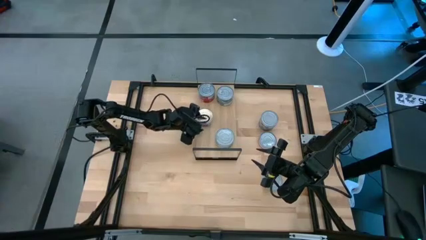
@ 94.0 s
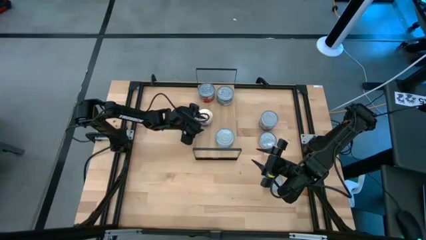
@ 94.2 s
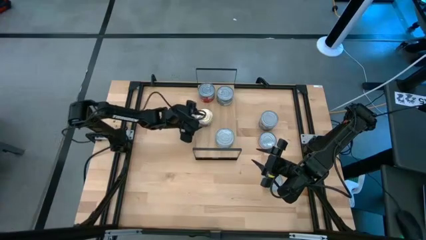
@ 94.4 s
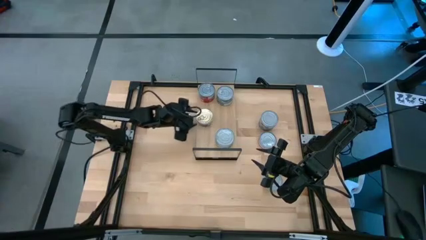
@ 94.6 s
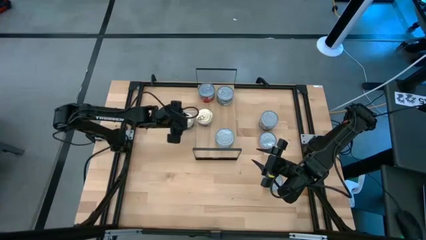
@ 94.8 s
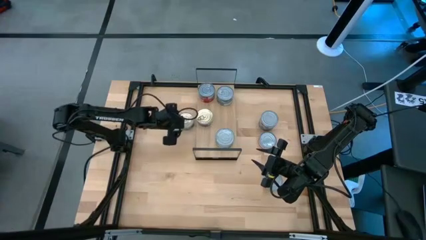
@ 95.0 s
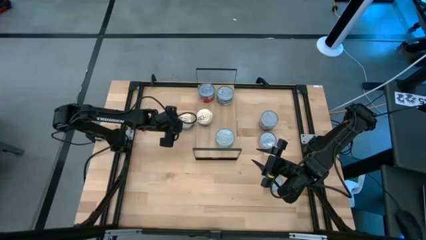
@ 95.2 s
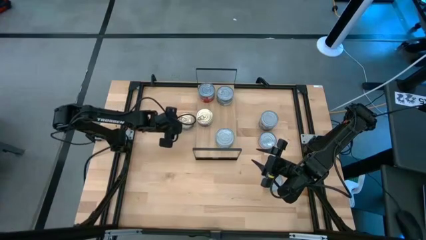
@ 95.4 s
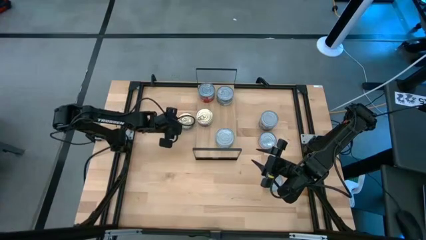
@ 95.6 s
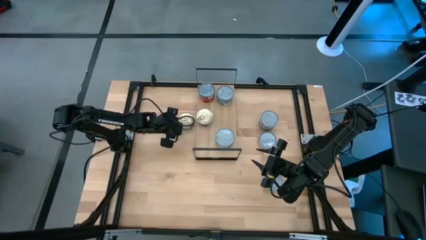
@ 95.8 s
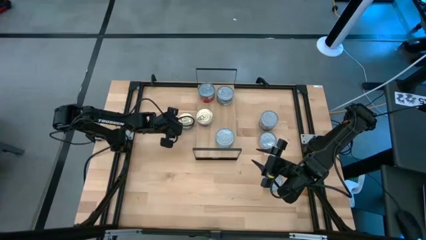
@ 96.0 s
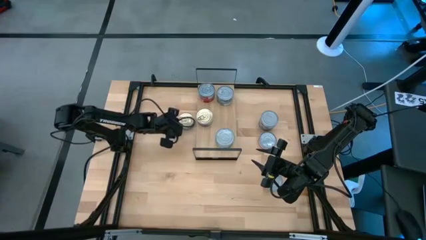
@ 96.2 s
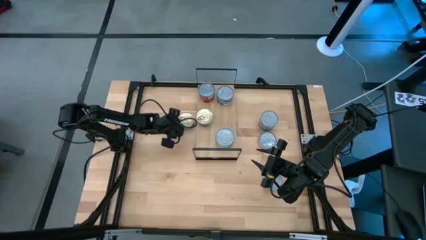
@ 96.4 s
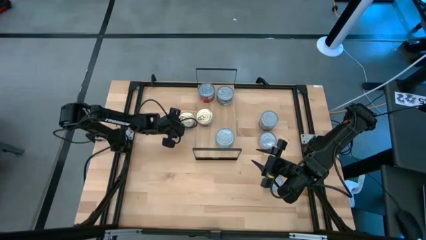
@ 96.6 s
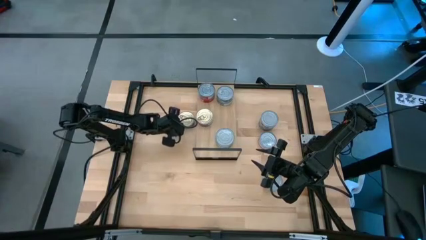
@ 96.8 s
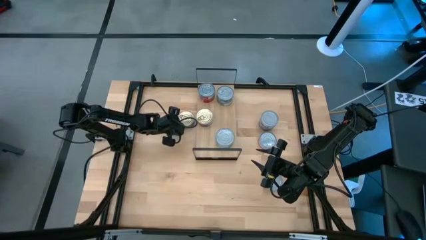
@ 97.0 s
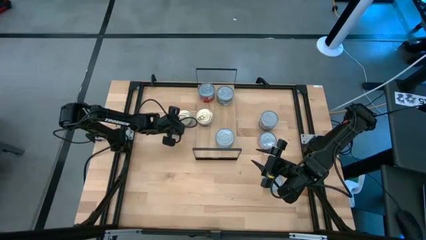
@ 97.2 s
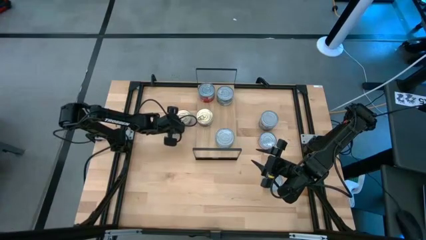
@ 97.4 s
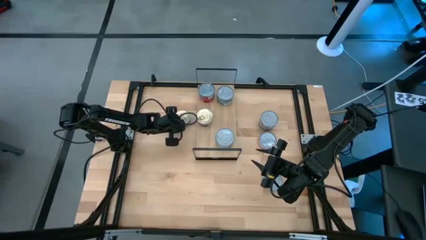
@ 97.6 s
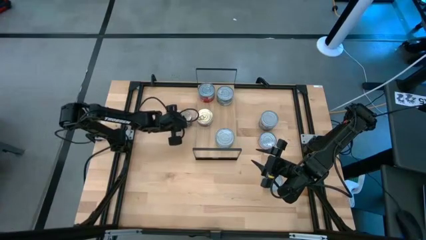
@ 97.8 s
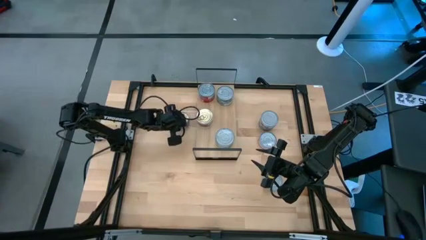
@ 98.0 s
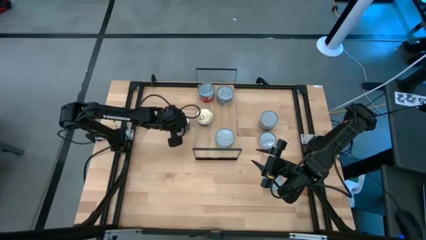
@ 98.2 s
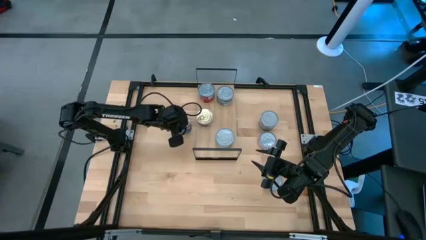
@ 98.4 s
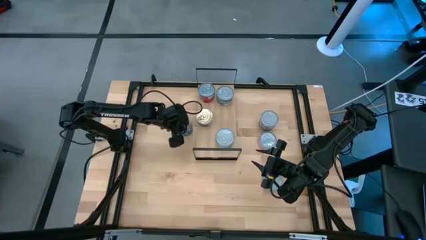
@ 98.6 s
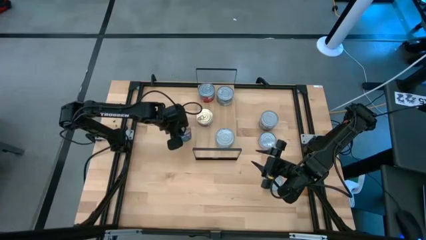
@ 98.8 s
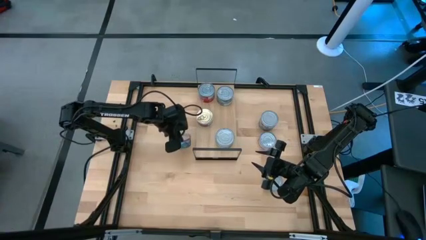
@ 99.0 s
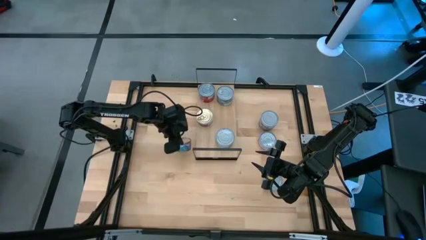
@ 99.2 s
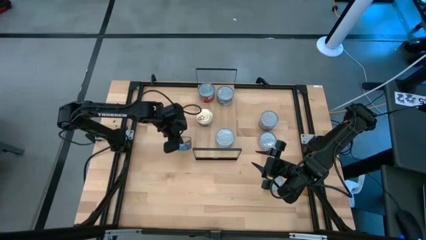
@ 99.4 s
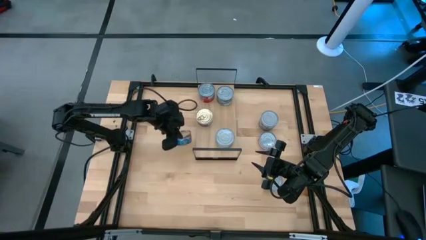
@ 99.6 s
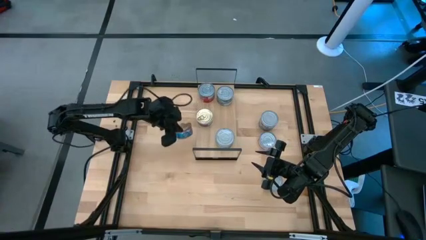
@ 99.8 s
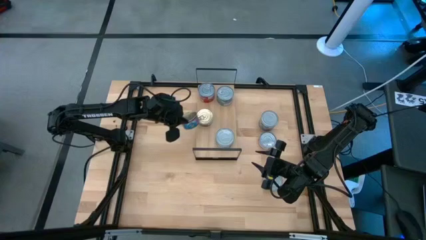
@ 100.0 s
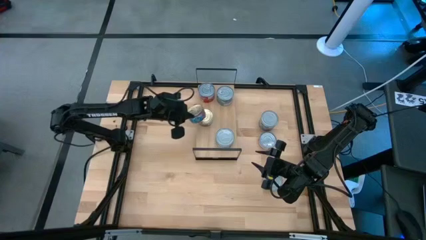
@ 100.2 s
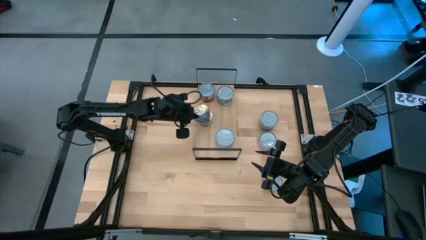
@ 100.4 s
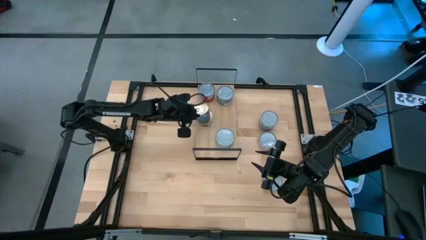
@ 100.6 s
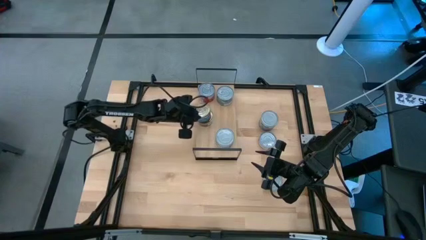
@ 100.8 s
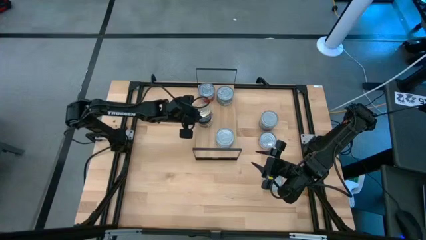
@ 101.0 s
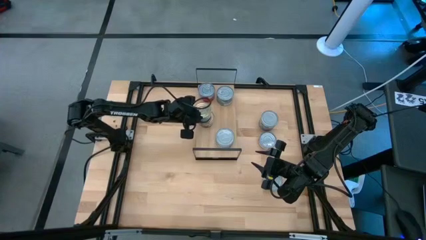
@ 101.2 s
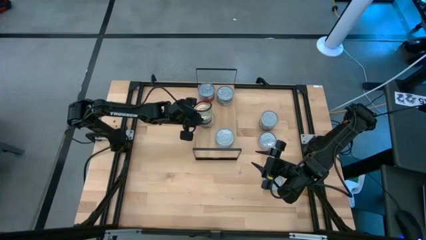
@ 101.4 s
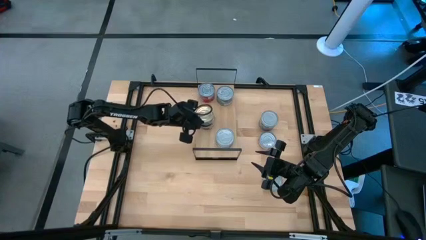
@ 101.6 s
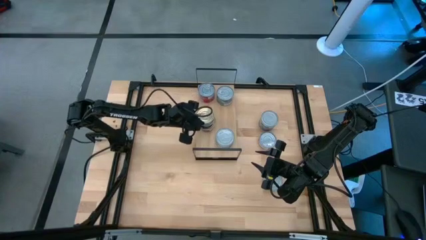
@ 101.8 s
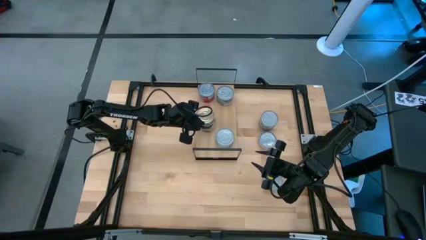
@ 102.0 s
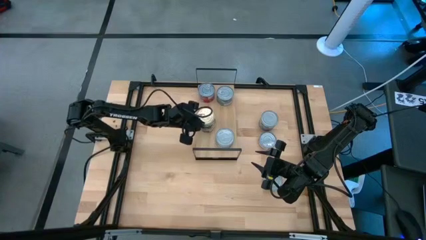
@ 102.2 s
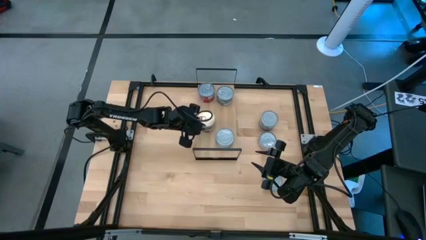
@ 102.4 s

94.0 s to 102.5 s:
Task: Stack canned seafood by type on shelf
Stack the blue and pink tuna can on top of the other blue and pink tuna can on the shelf
